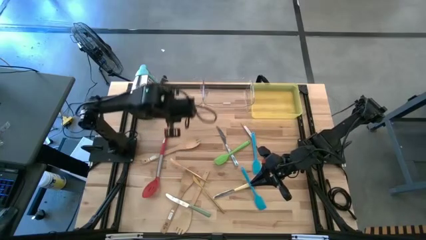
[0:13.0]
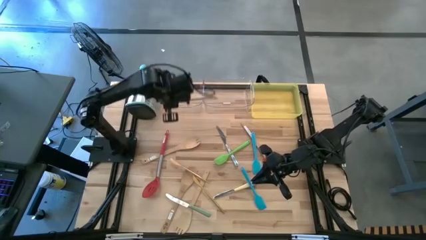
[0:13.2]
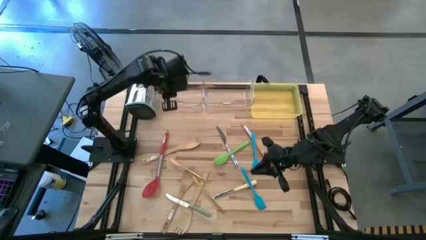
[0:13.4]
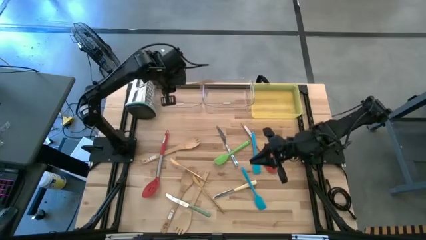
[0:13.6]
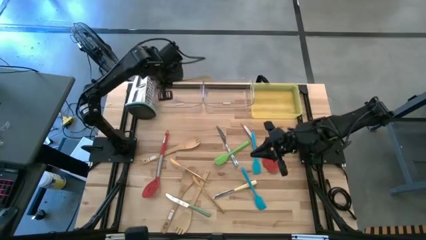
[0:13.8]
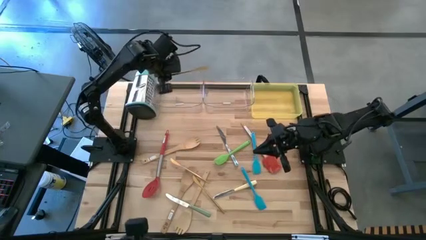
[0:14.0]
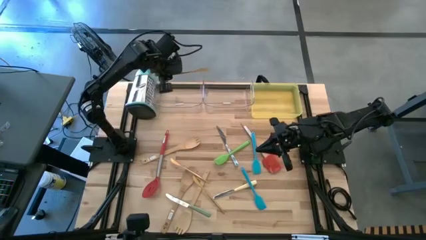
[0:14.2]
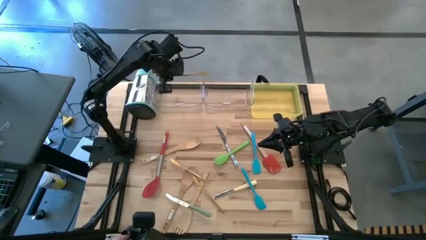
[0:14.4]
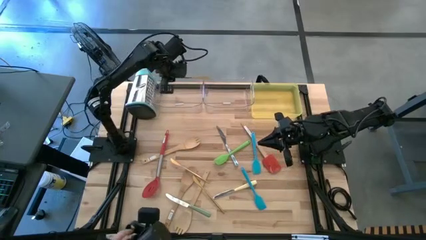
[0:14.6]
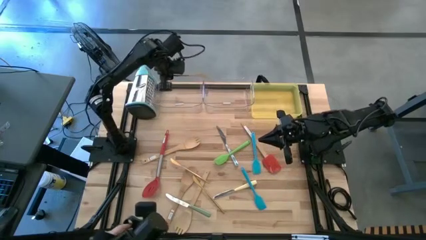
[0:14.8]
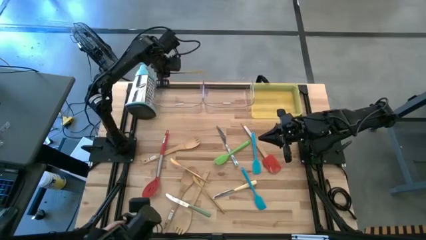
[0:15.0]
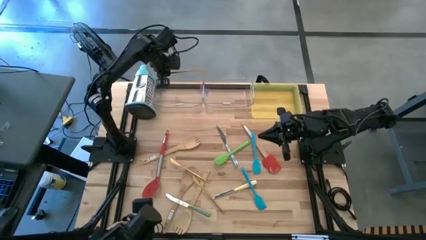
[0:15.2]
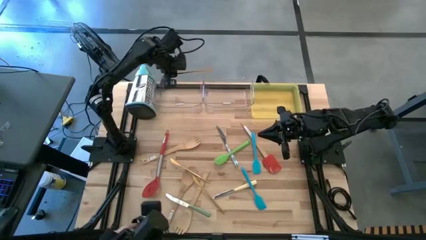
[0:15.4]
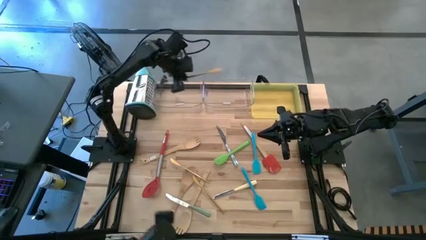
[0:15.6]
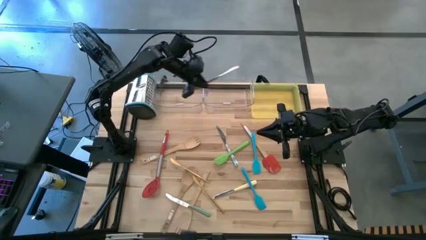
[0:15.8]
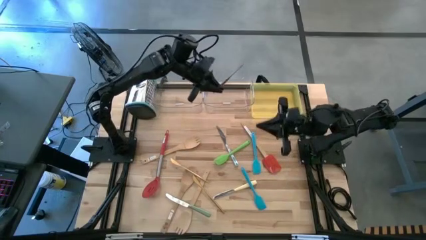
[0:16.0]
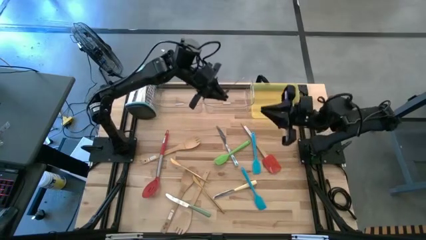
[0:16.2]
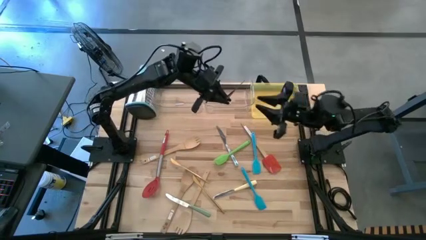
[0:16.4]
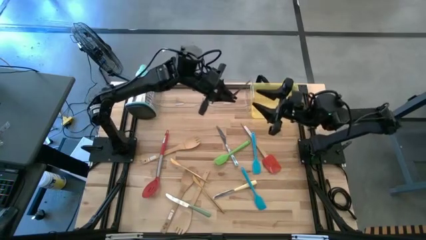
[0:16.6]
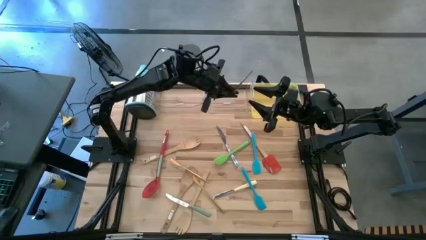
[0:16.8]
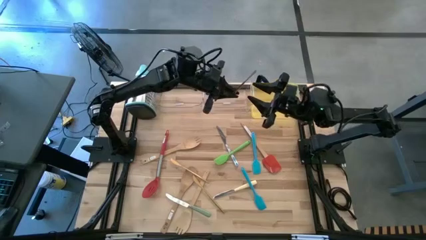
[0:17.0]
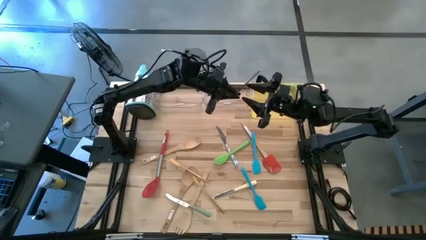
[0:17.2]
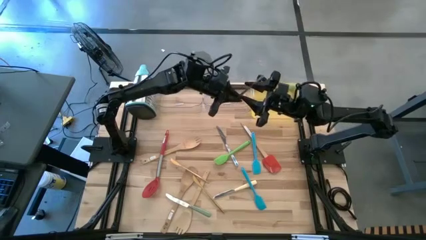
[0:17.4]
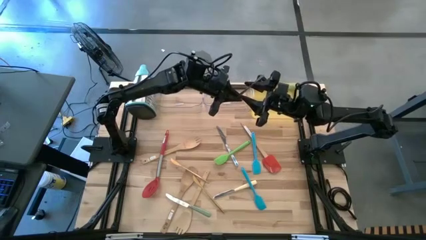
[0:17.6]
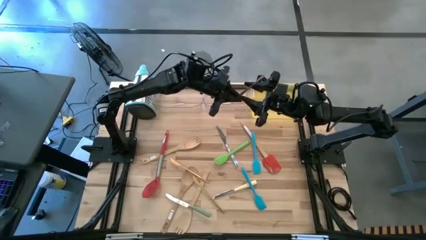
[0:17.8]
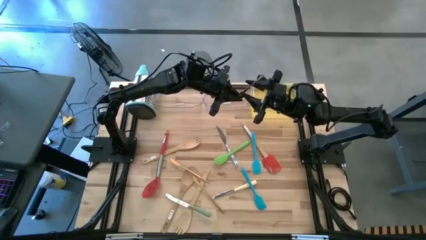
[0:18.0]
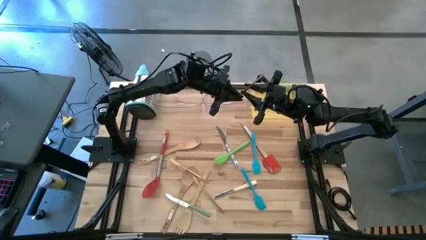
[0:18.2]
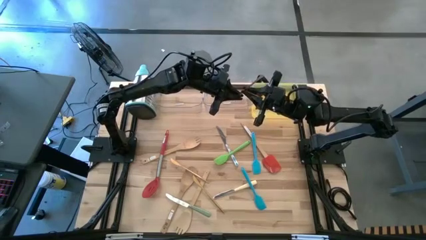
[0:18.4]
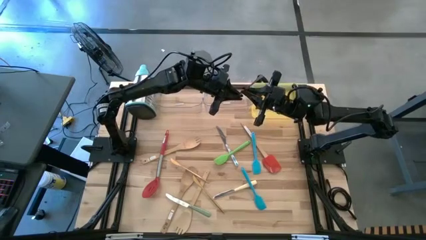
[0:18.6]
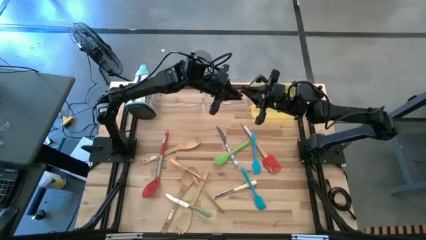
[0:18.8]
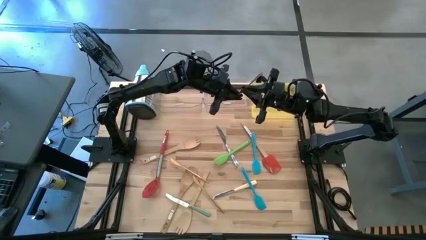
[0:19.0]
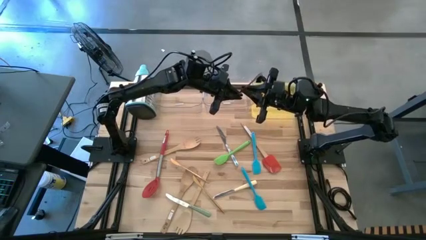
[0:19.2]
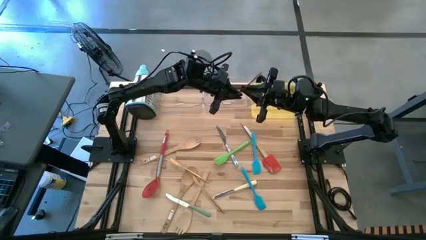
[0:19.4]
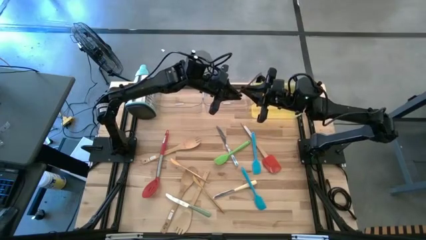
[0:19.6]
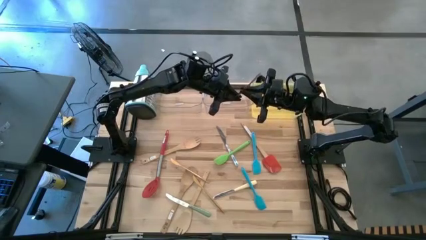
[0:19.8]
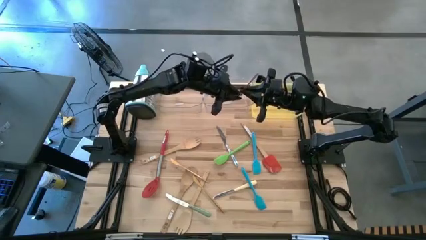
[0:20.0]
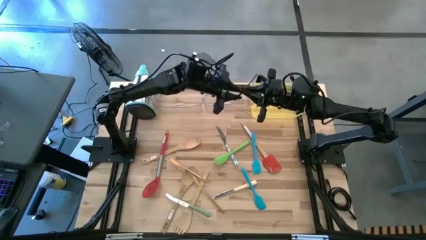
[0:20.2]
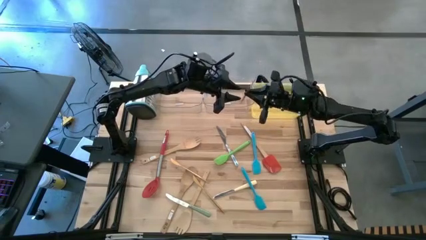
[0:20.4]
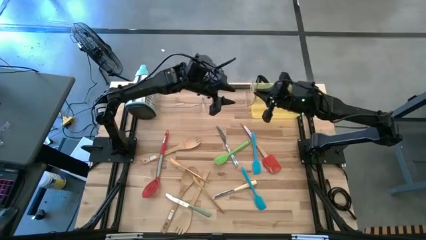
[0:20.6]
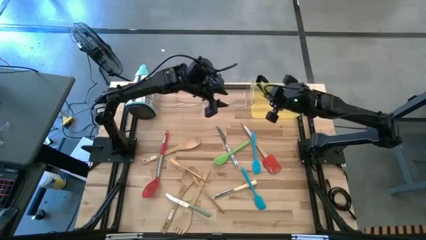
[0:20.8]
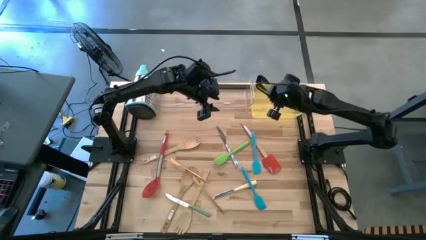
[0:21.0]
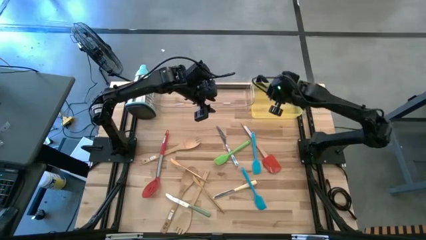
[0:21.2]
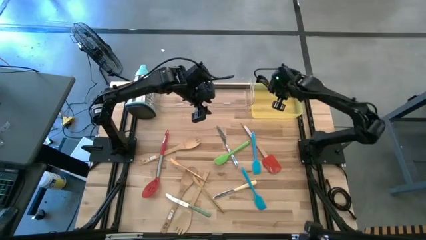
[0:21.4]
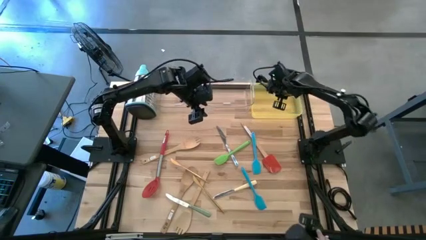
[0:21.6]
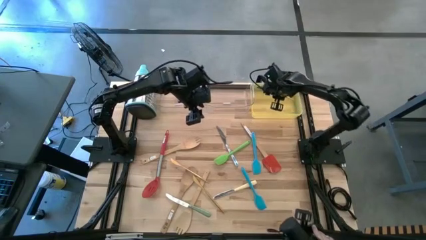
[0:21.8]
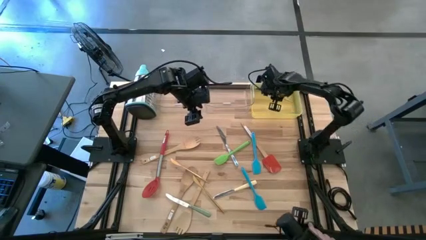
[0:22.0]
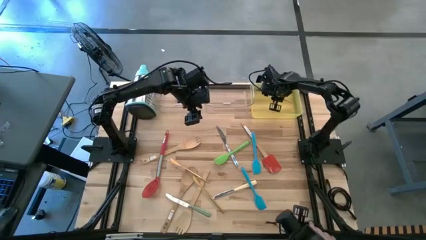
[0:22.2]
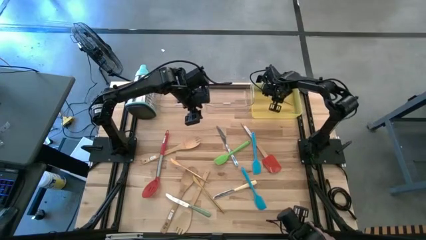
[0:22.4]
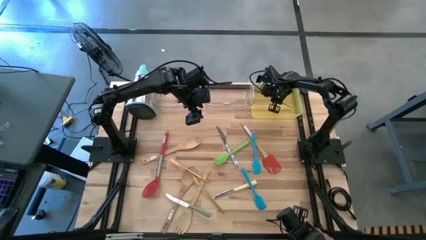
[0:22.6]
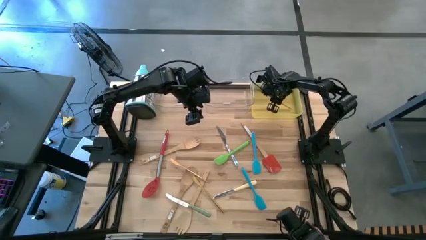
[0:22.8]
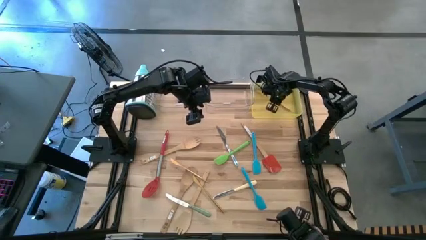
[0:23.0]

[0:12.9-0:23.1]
Task: Pick & Place Kitchen Items
Put the top gold knife into the yellow bin
